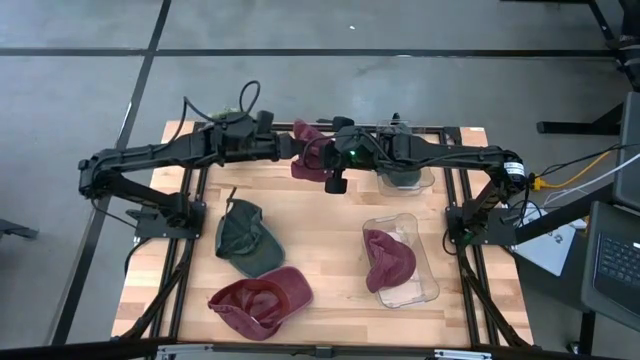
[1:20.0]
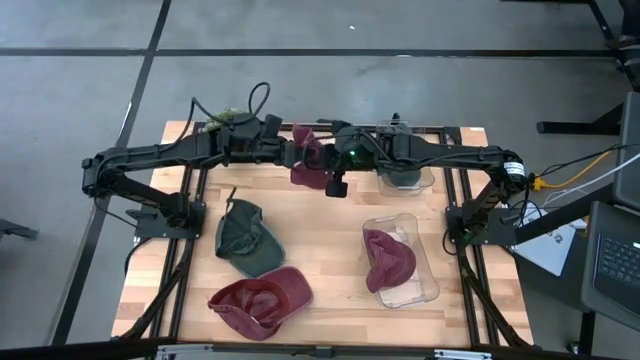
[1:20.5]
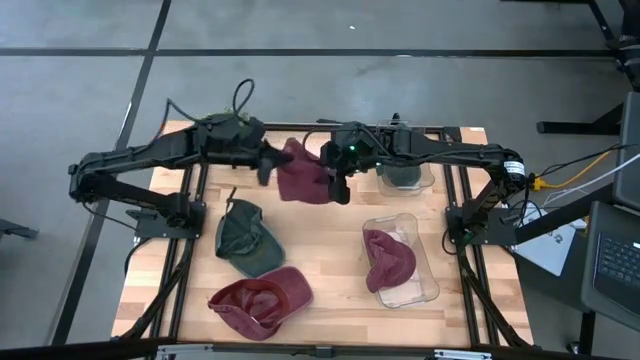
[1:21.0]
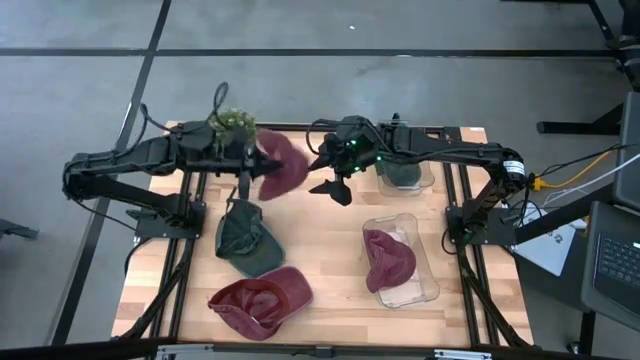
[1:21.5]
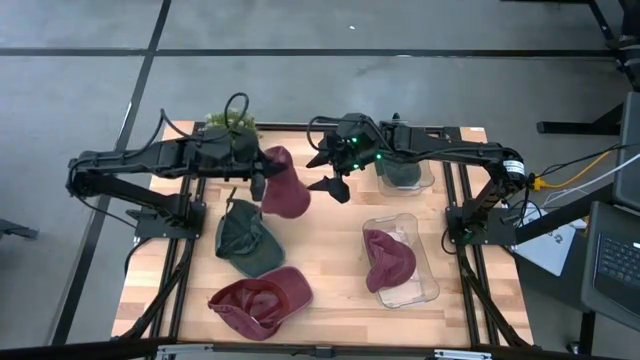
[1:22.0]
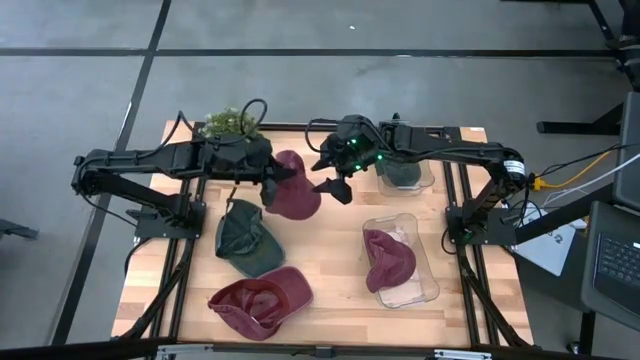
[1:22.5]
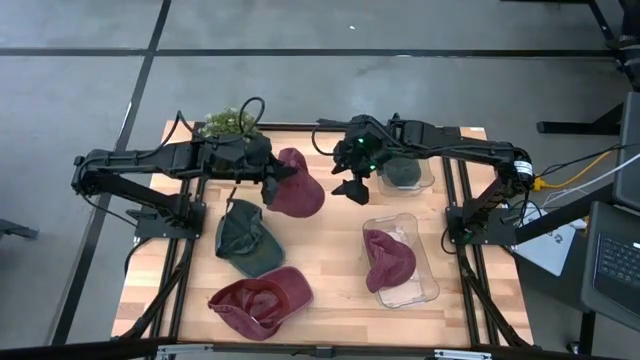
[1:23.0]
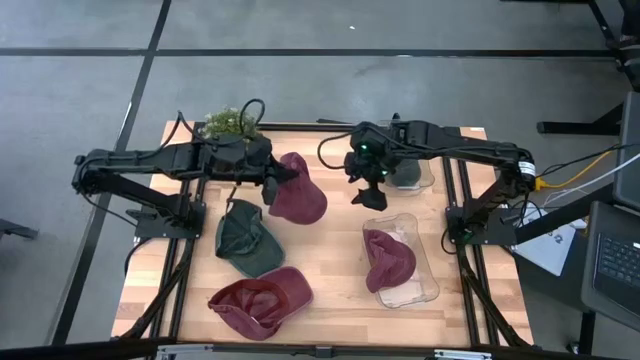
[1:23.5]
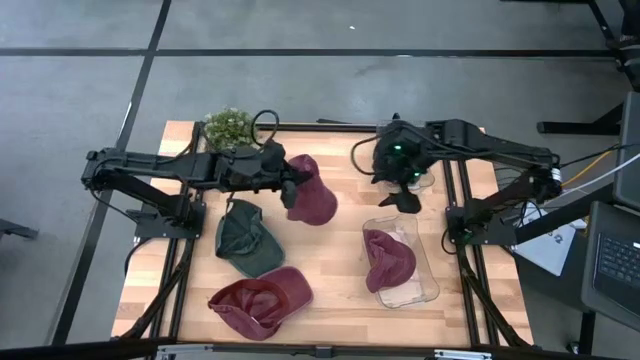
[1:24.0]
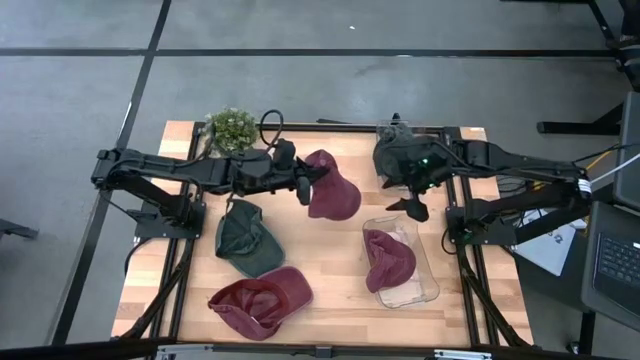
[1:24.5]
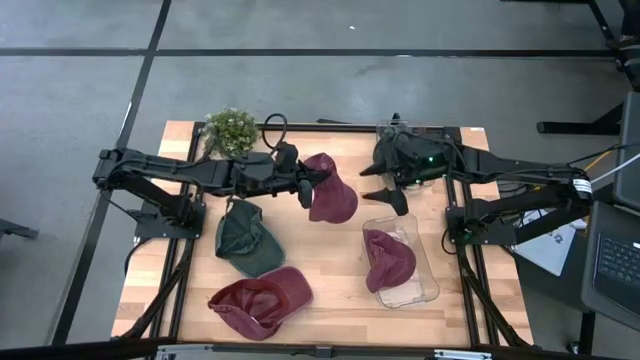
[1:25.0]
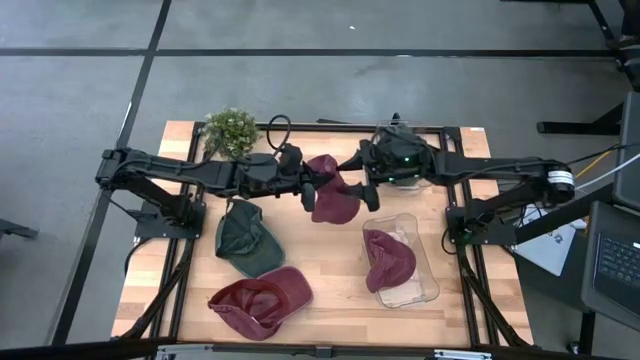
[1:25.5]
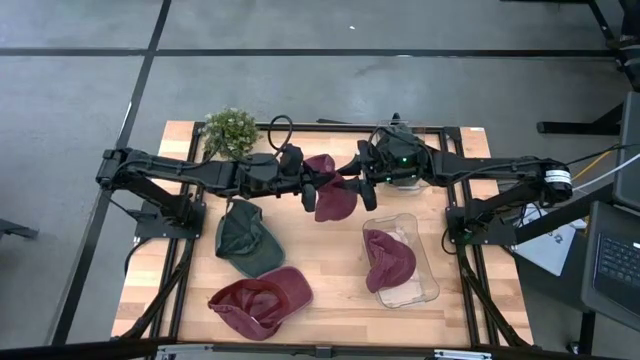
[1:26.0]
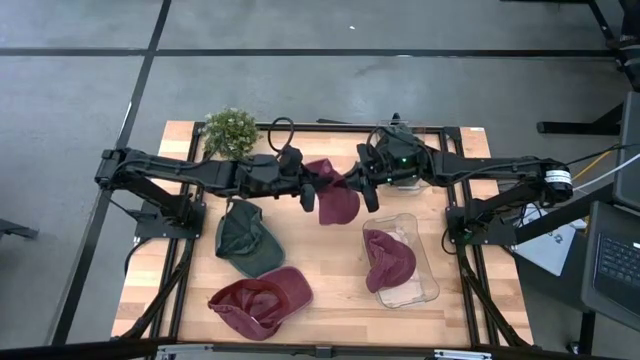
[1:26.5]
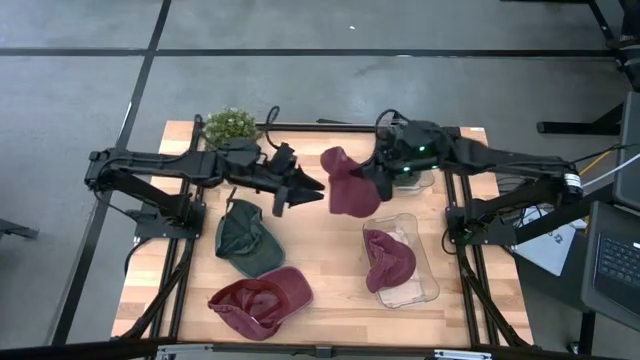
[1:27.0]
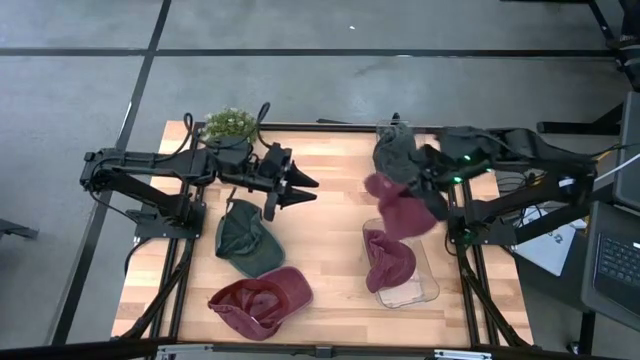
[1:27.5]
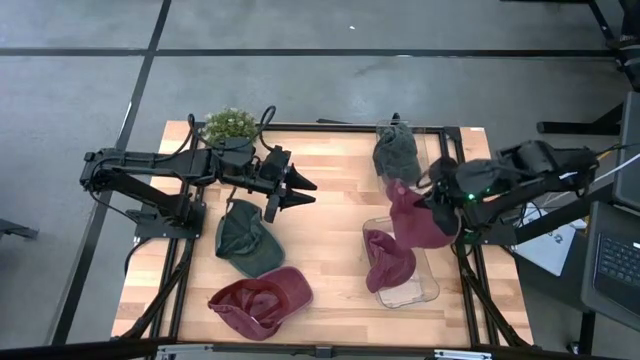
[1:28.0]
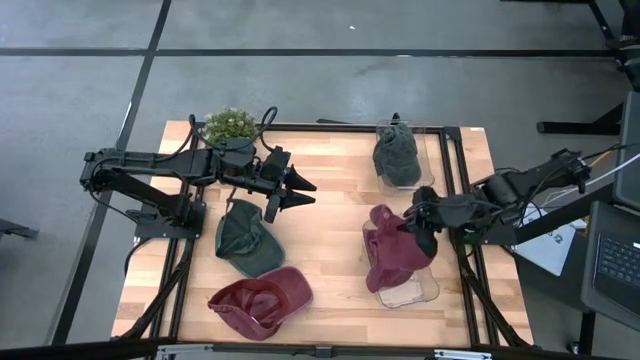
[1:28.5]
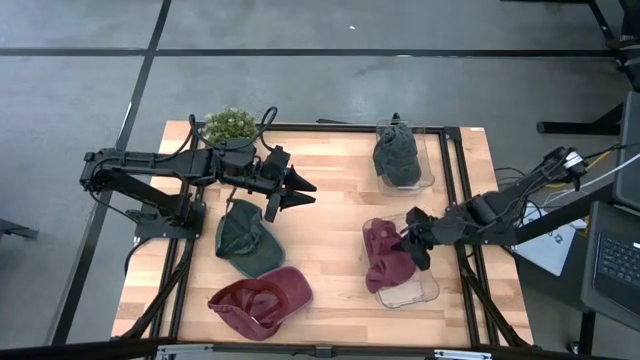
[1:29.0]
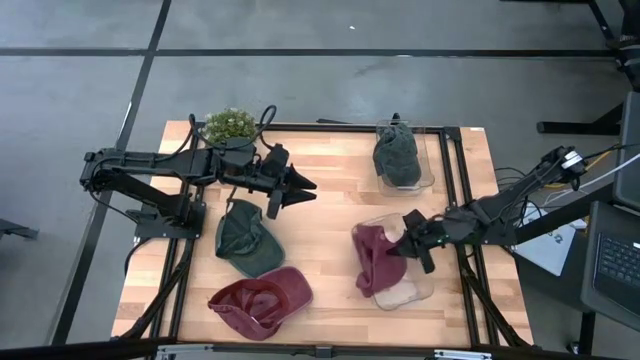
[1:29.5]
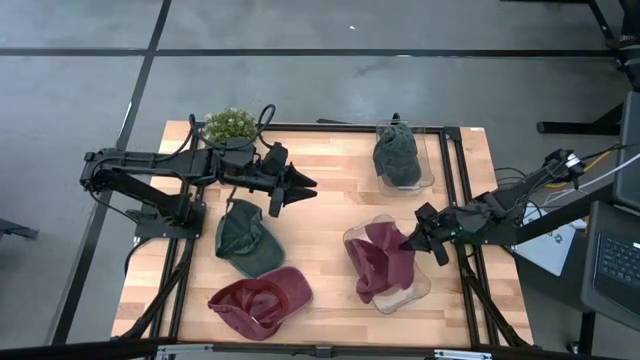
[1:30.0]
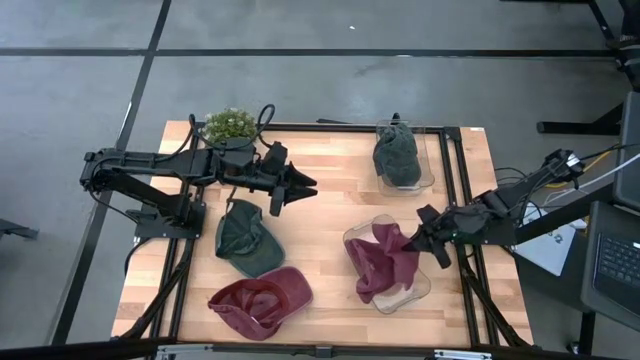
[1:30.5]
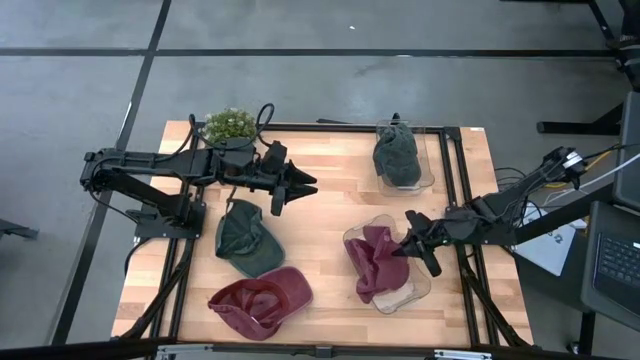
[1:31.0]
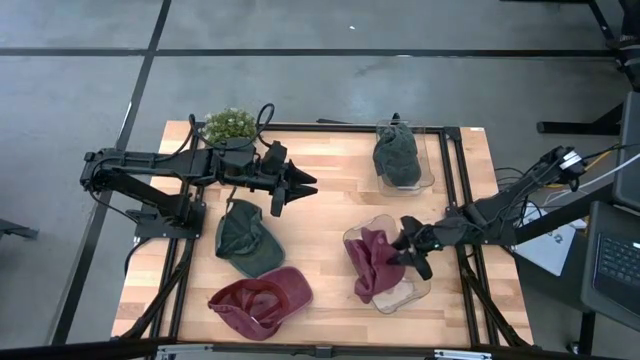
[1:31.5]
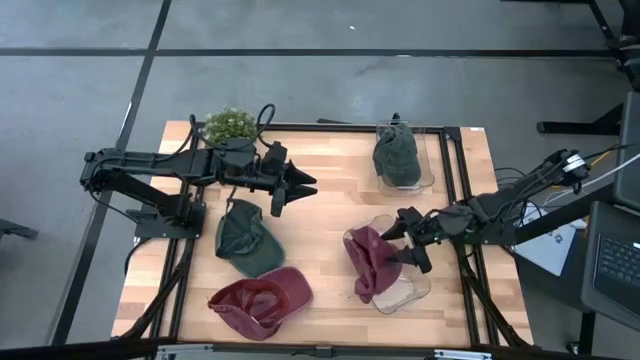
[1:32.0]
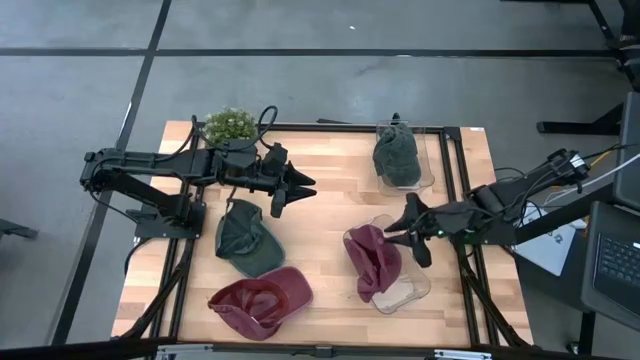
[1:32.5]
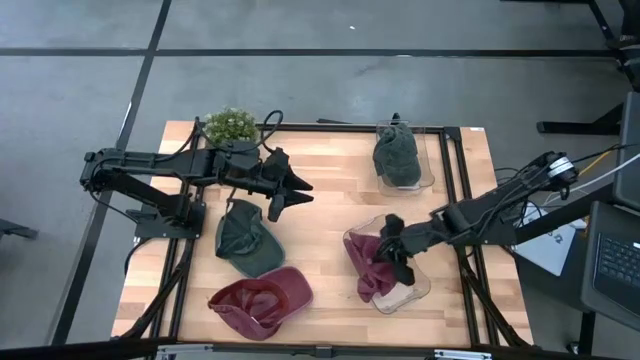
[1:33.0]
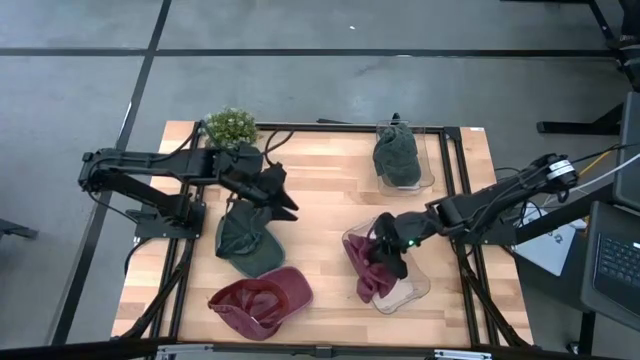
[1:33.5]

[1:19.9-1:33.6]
Task: Pick & Place hat
Put the top red cap into the bottom transparent bin

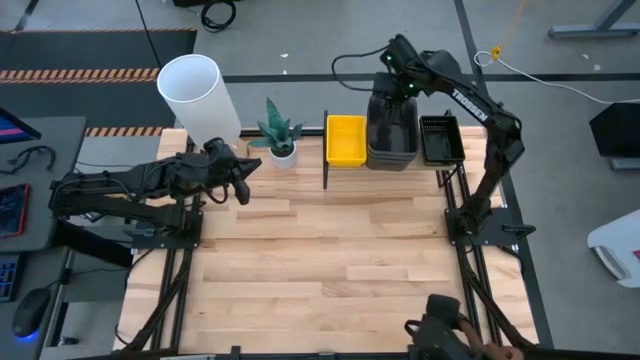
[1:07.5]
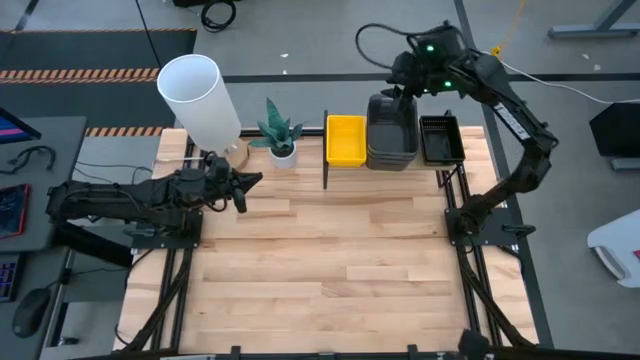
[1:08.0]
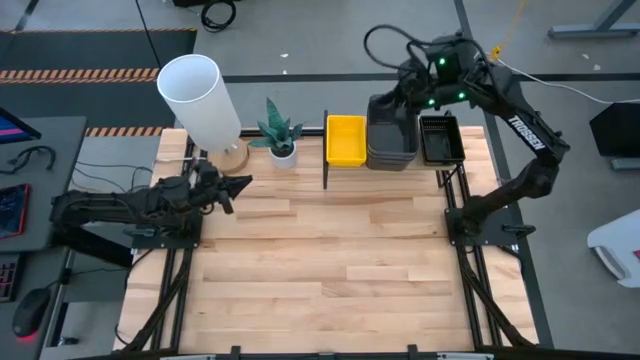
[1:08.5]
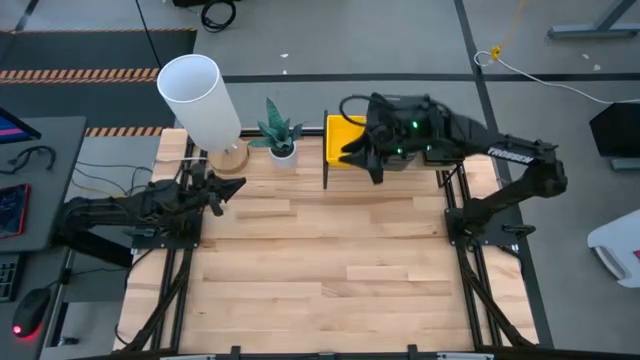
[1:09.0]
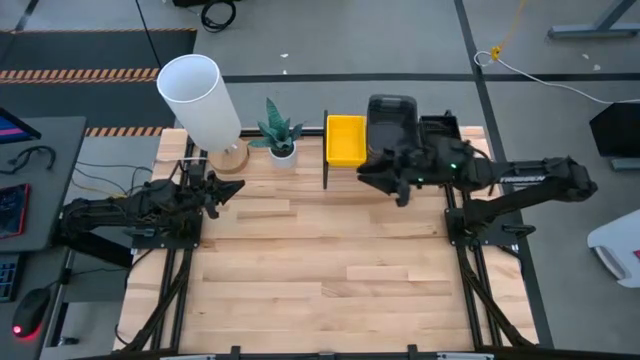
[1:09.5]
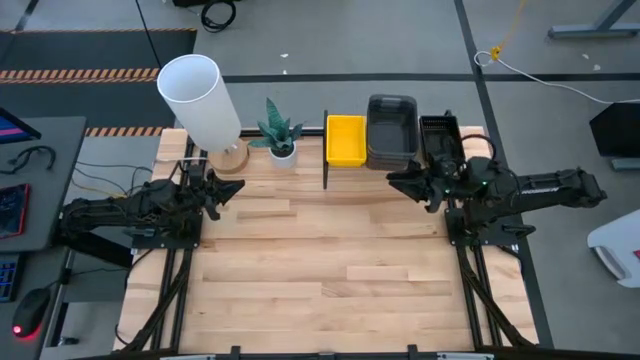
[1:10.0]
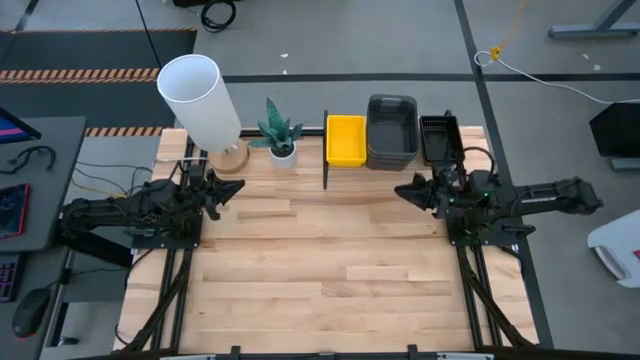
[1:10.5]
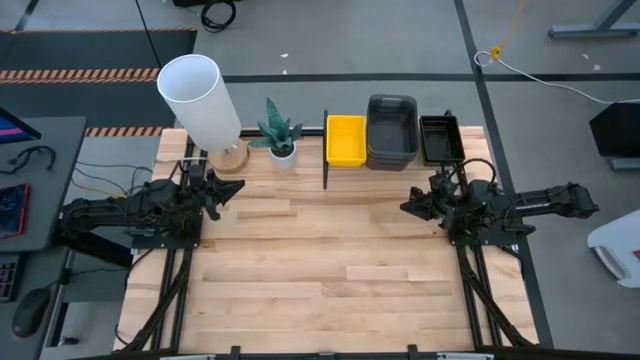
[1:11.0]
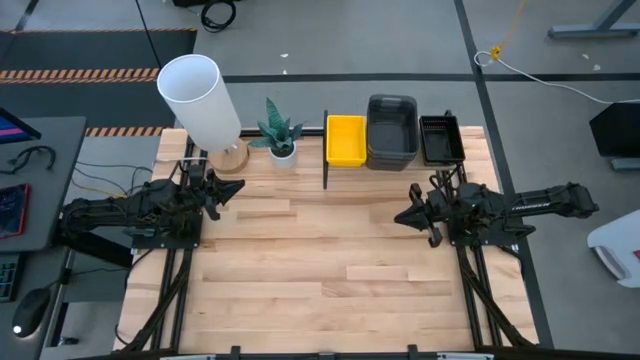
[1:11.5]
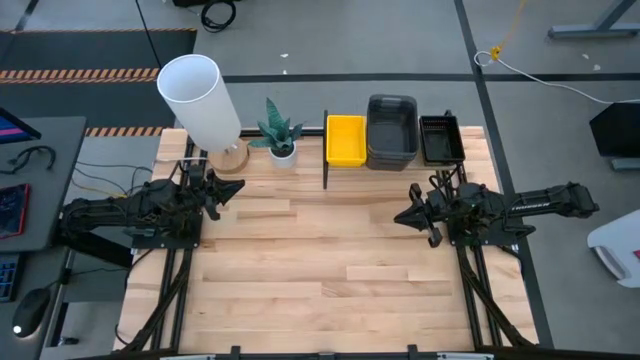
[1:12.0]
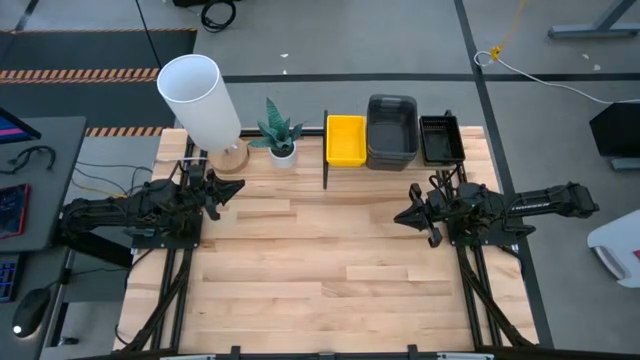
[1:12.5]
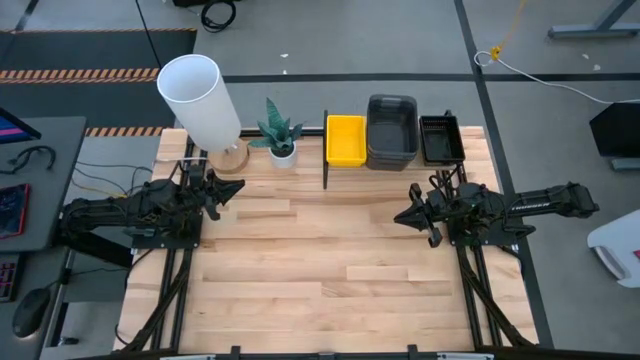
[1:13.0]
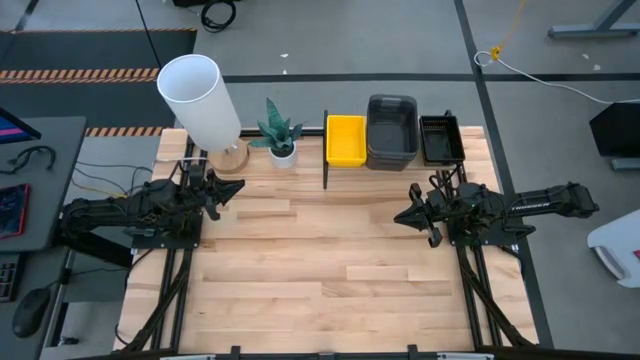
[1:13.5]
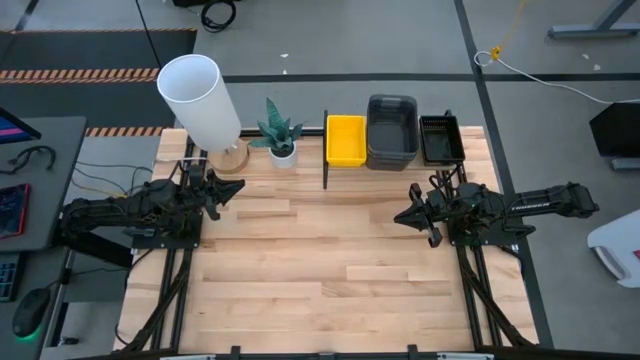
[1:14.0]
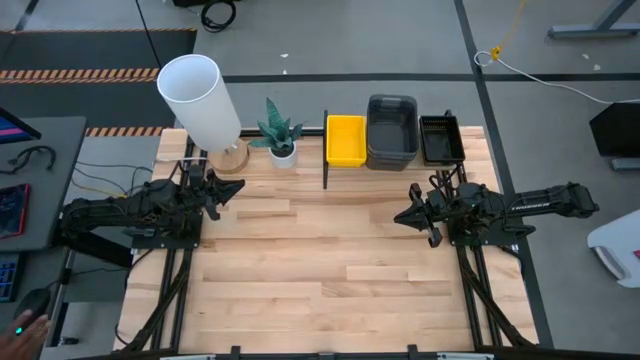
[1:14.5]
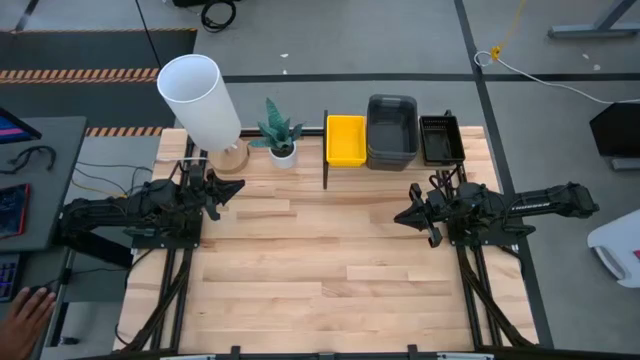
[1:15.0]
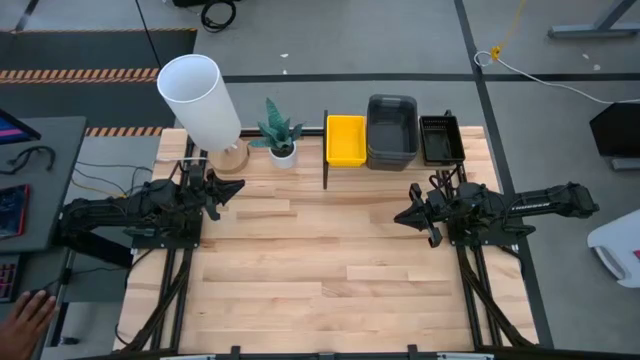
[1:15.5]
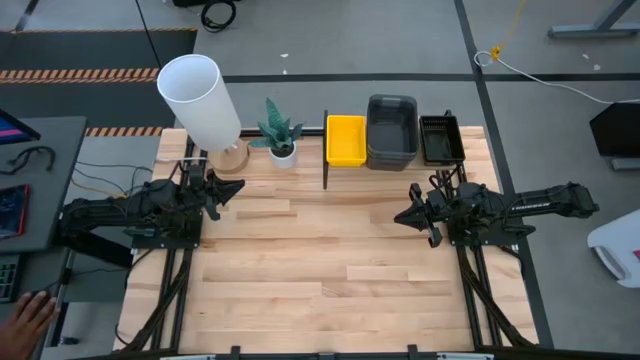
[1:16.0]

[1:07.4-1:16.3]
Task: Stack baskets on shelf by color
Return to Home Position
